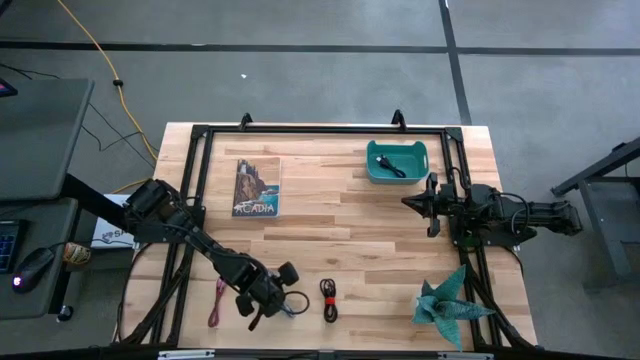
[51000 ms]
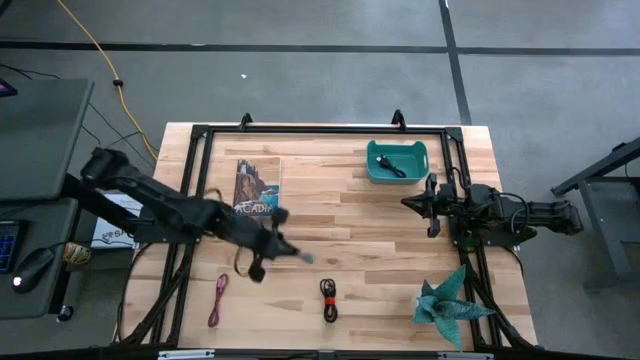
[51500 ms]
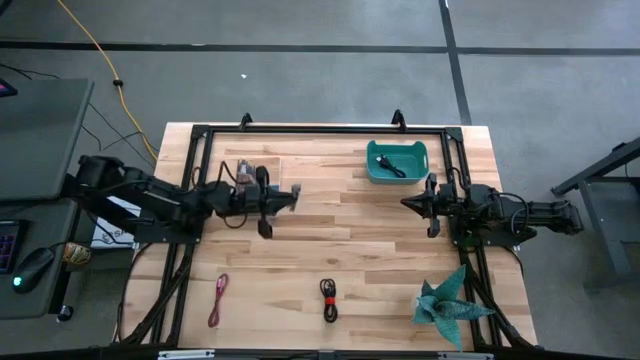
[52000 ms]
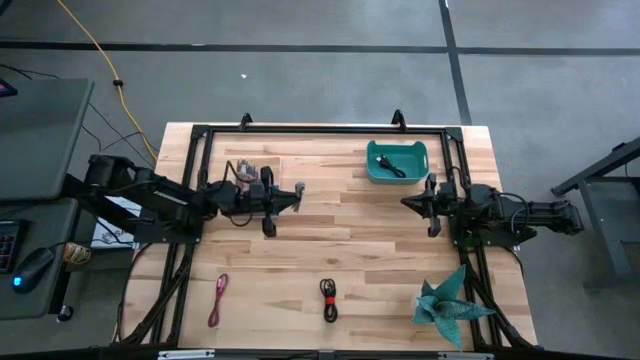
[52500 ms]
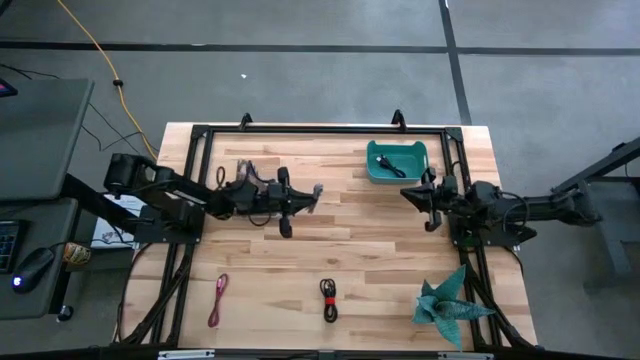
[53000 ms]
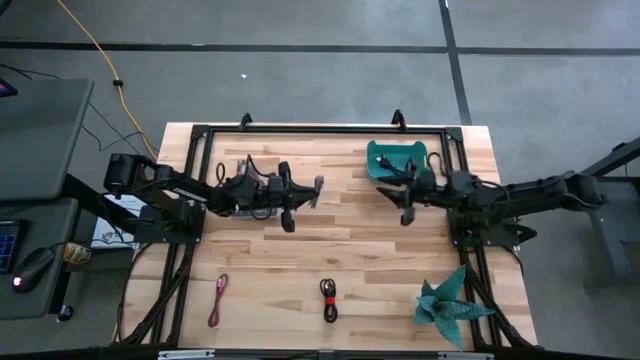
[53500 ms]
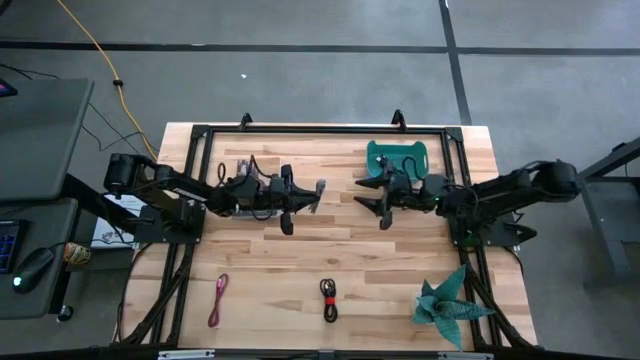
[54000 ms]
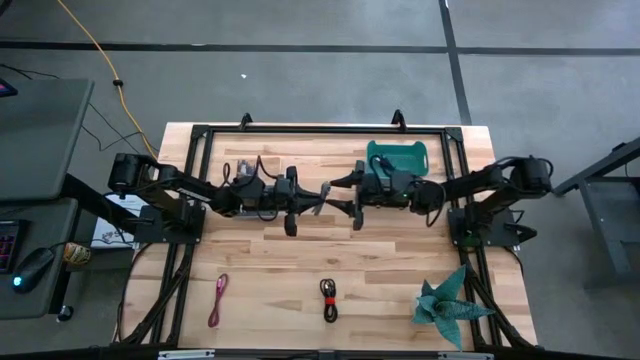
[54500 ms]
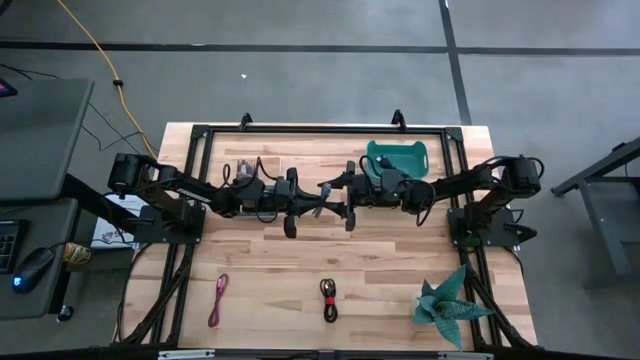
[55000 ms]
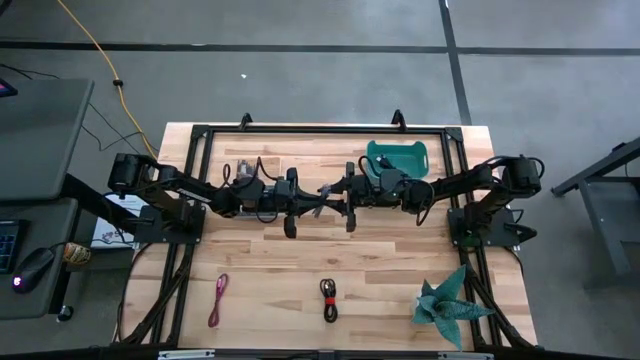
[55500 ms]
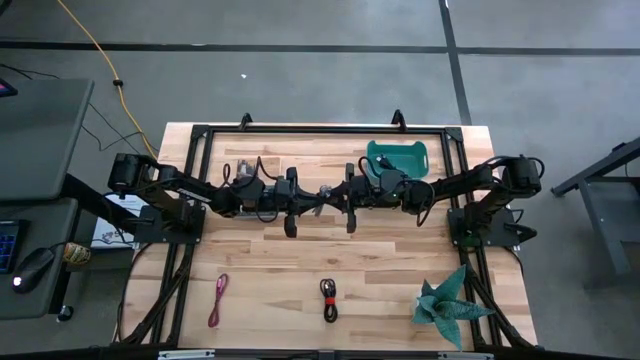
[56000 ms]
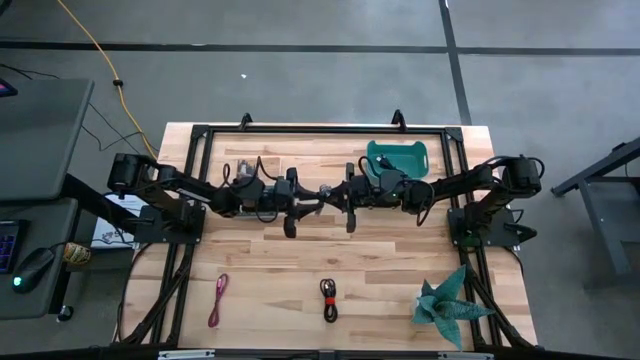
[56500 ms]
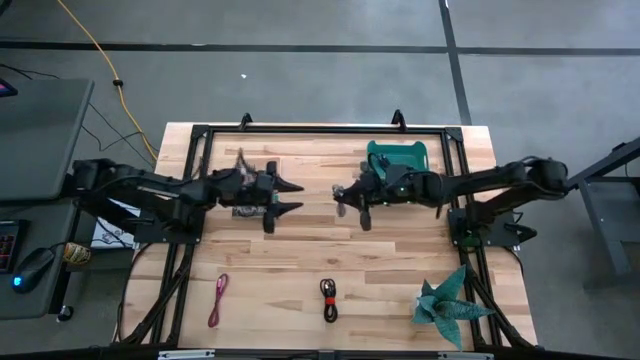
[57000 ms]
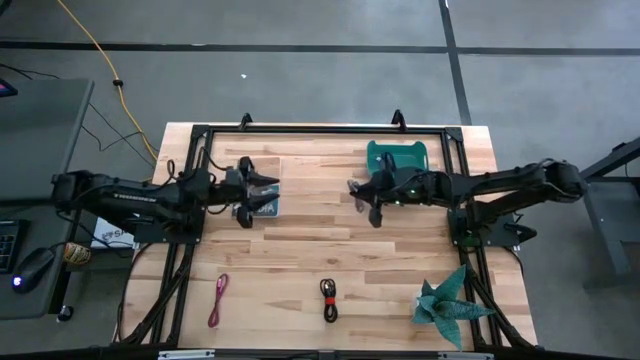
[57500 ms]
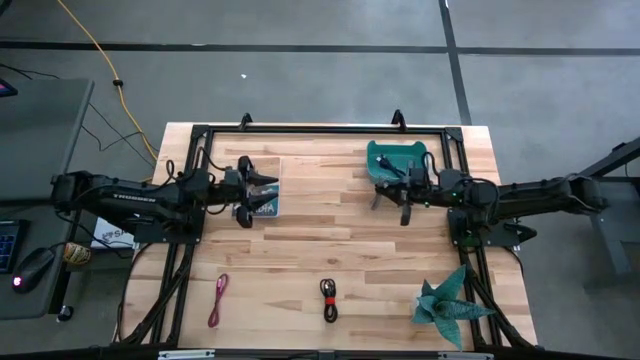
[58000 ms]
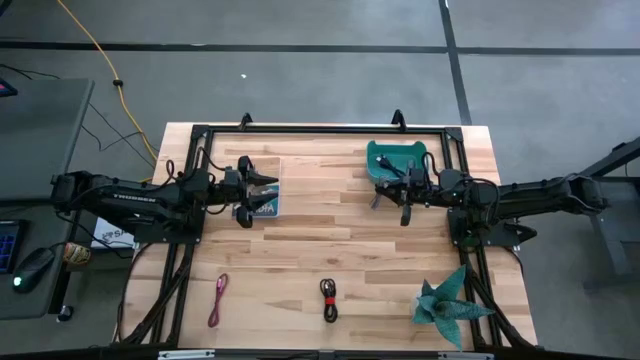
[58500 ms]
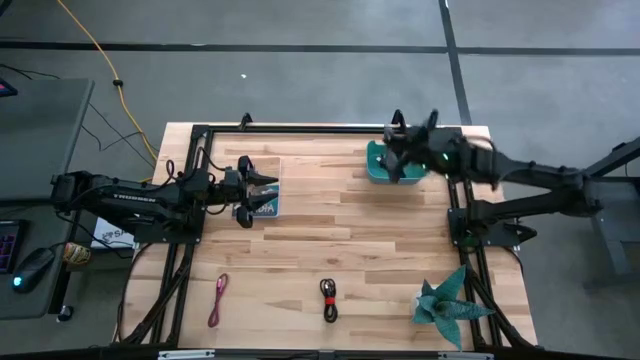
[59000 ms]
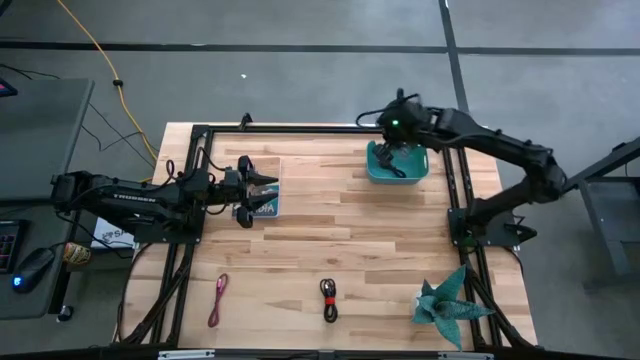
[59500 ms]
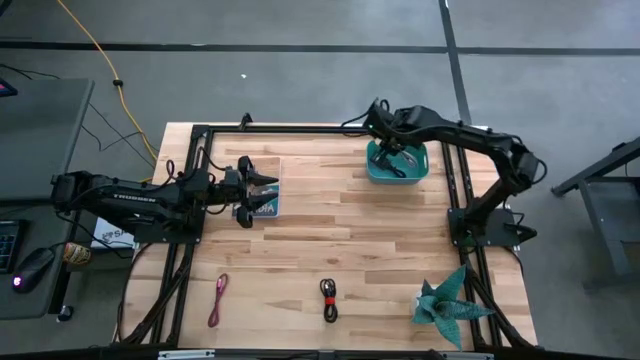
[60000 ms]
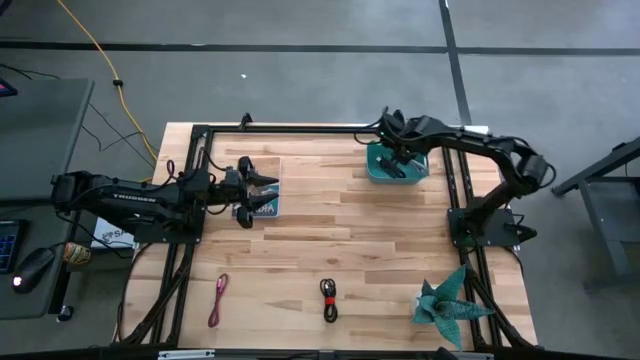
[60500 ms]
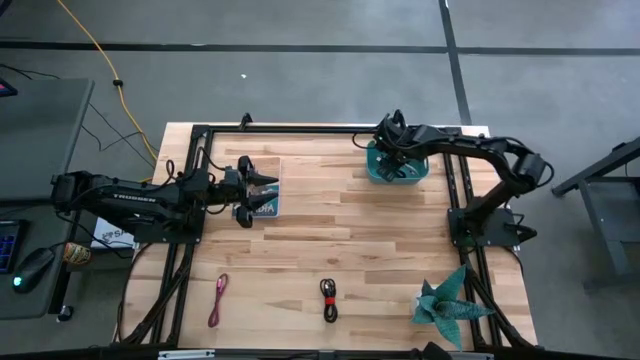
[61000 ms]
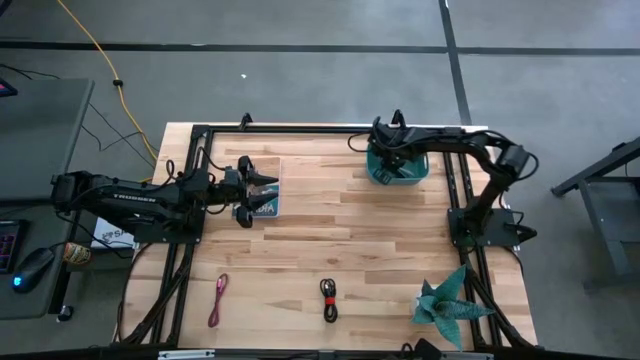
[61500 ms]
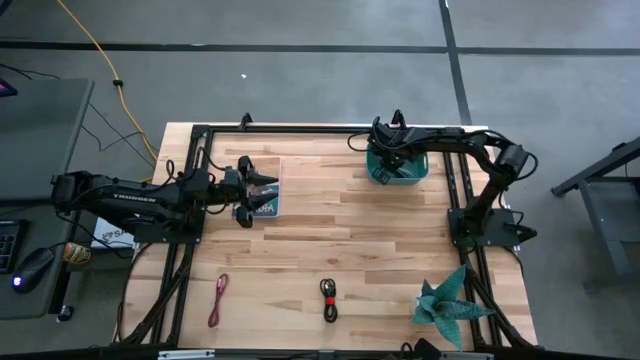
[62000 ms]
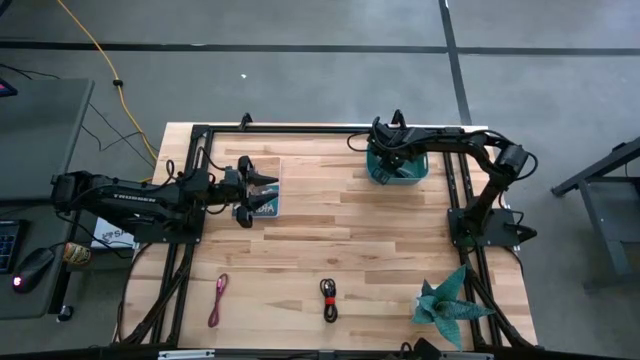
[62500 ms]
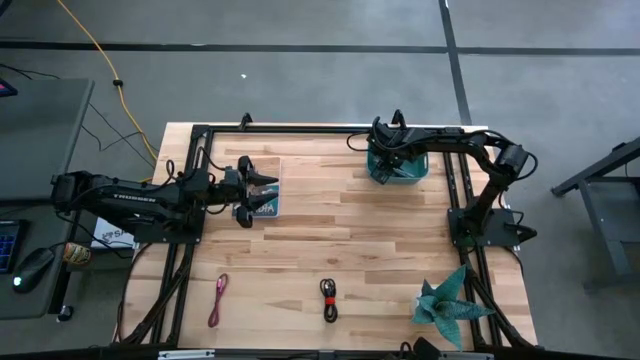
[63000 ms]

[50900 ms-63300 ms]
Task: Pick and place USB-C Cables
Put the white charger cable into the green bin

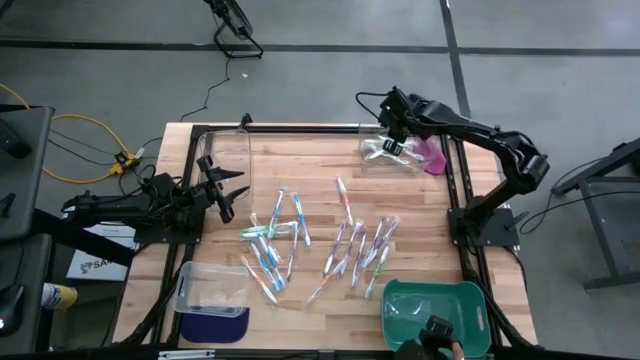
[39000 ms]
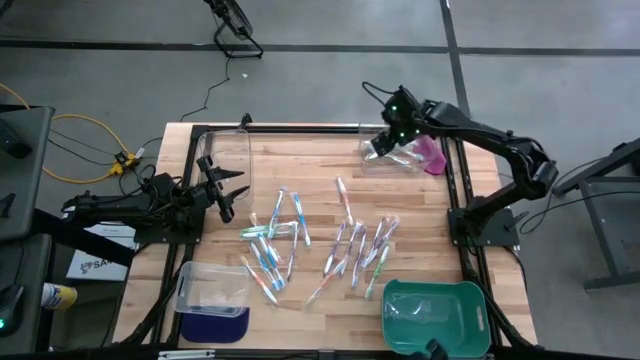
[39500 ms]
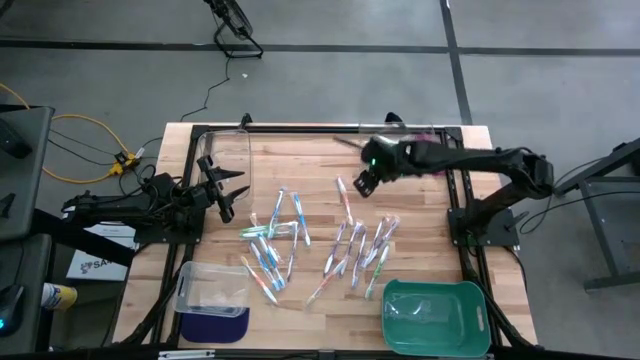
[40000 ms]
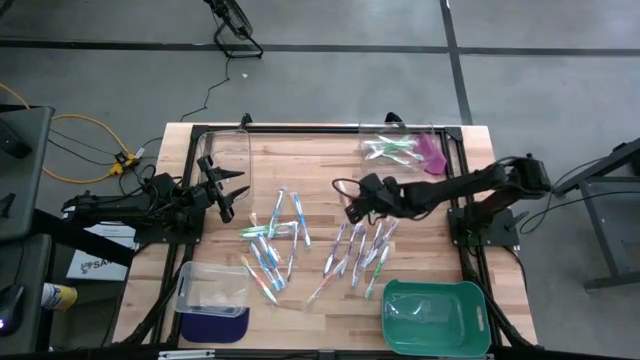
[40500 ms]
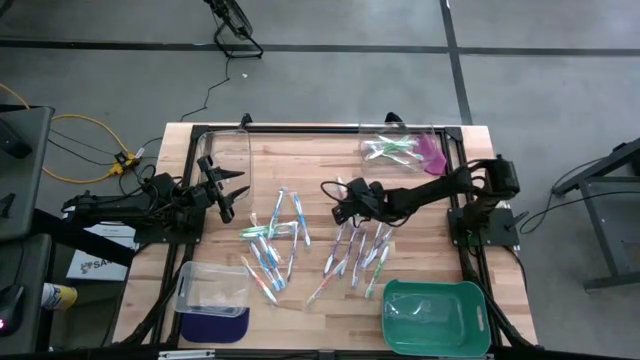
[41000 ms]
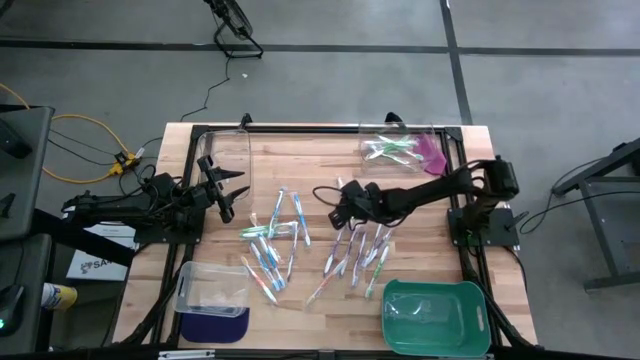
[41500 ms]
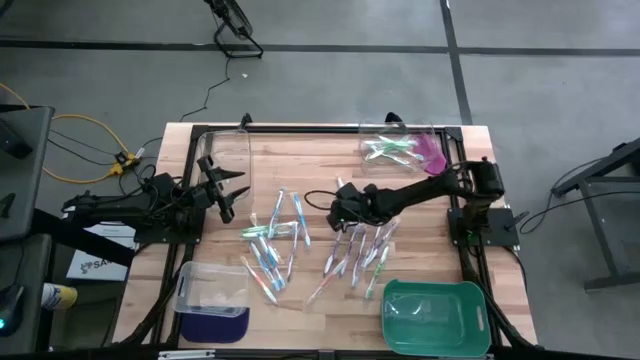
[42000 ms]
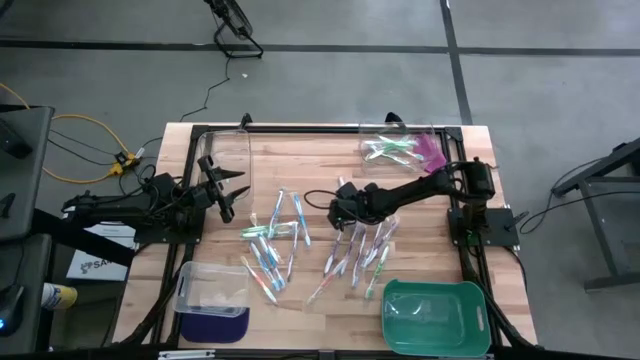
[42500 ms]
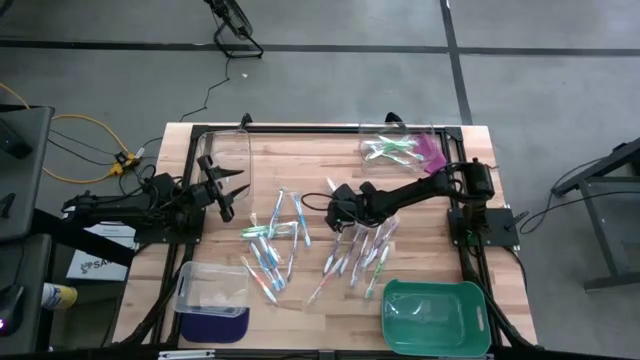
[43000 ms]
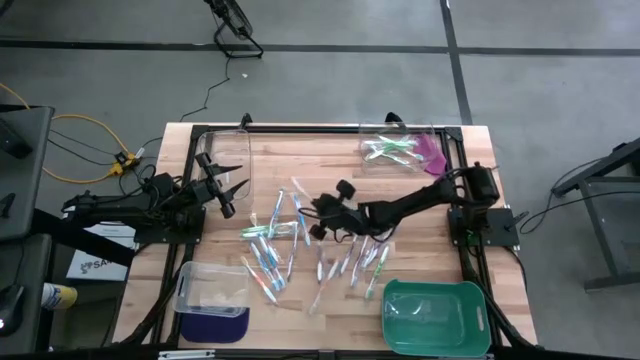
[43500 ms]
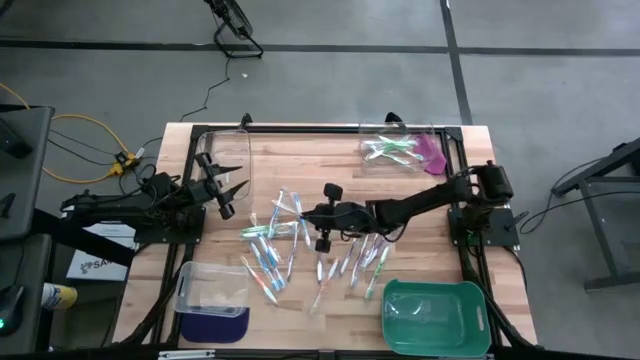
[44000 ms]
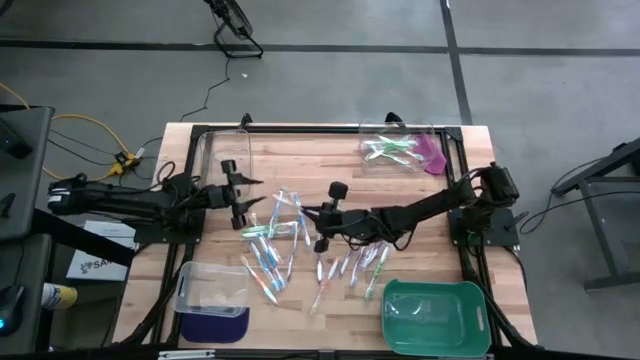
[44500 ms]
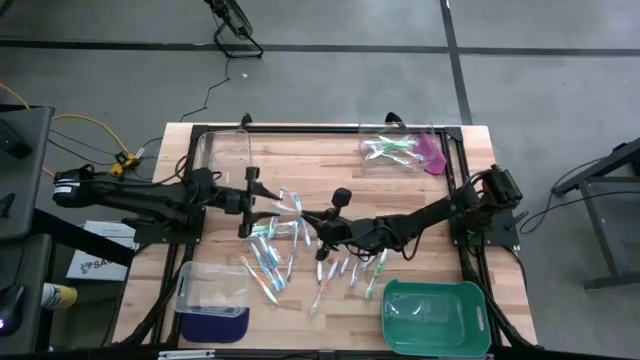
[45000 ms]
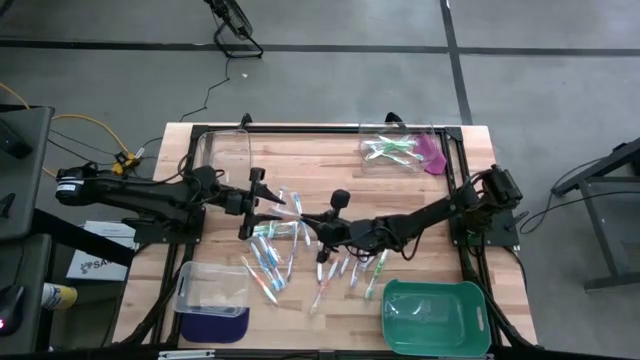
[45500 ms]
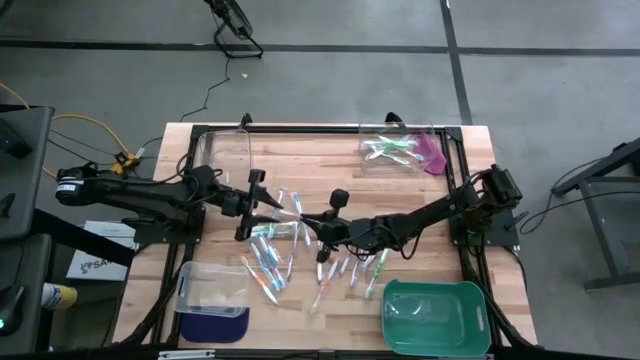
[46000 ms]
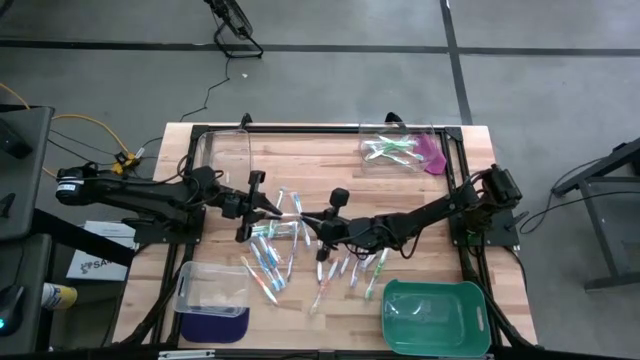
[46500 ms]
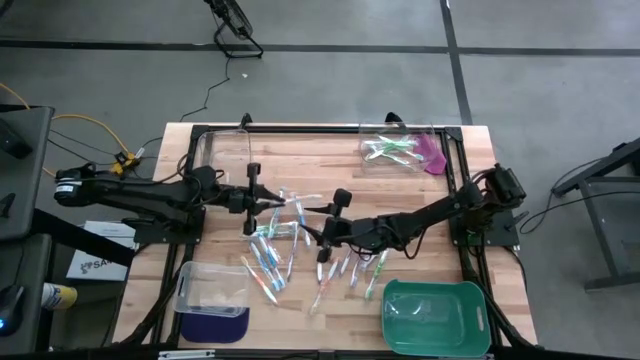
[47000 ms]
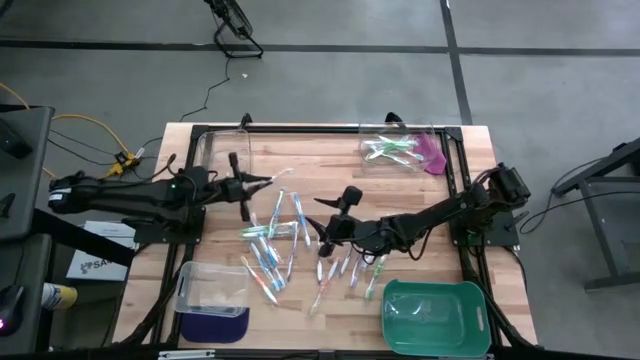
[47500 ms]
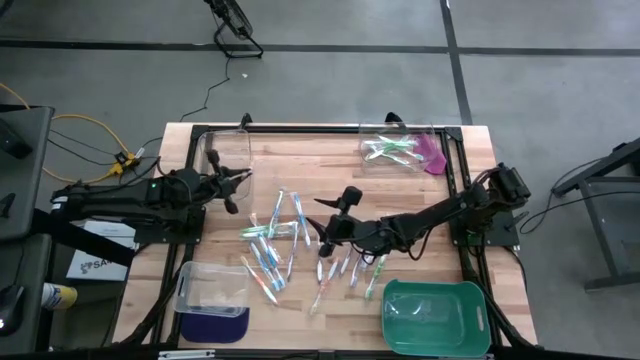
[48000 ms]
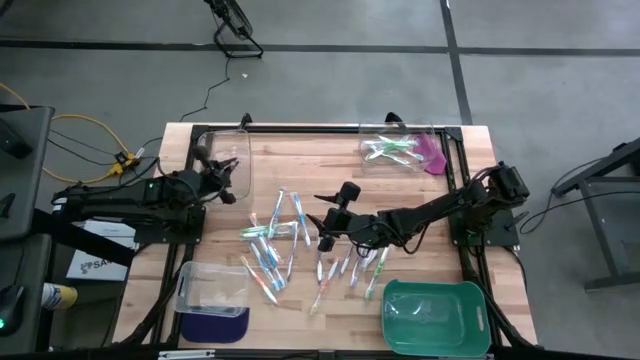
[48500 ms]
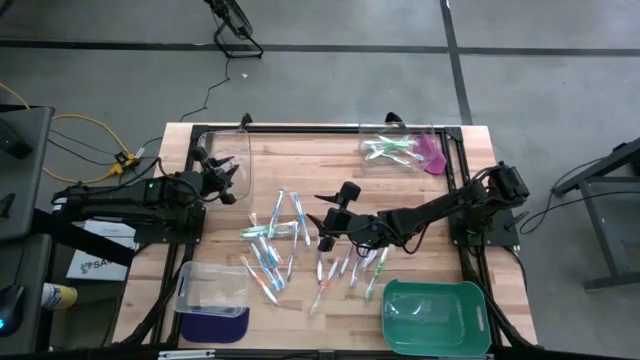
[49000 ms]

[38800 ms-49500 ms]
Task: Pick & Place Toothbrushes
Put the orange toothbrush into the top left transparent bin
